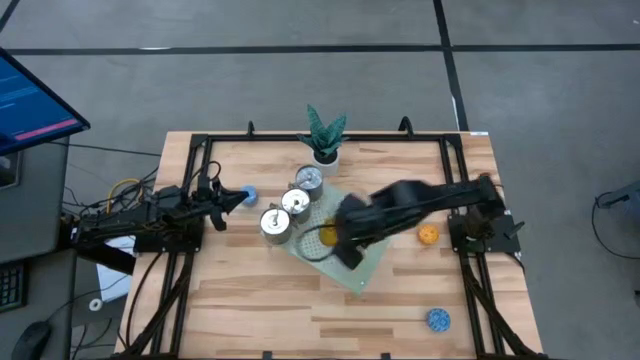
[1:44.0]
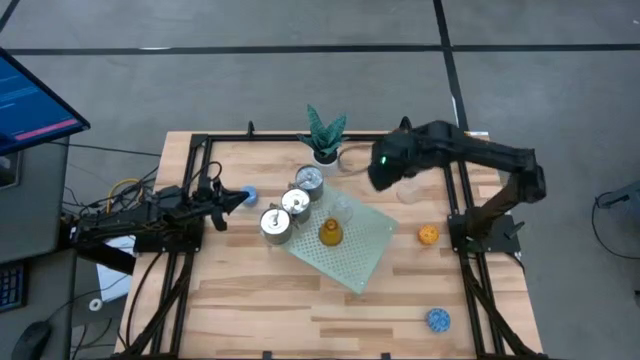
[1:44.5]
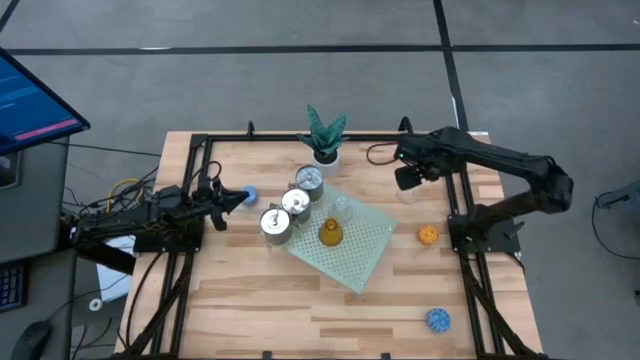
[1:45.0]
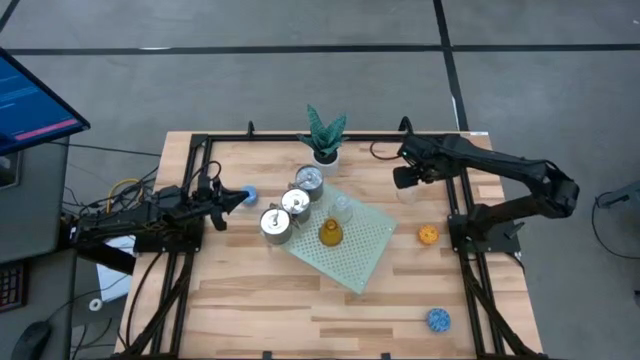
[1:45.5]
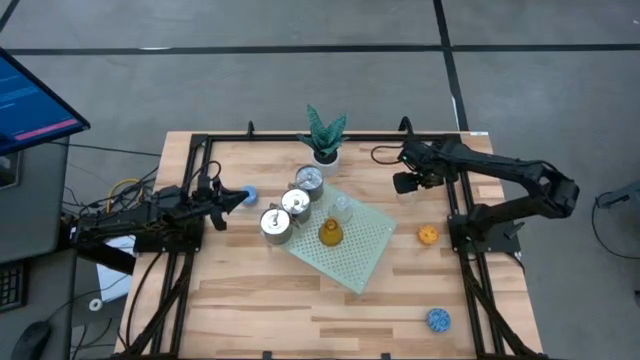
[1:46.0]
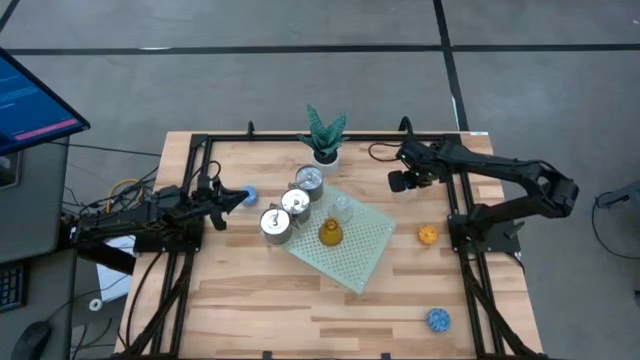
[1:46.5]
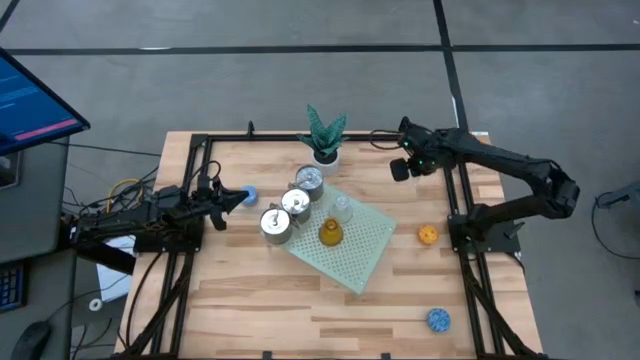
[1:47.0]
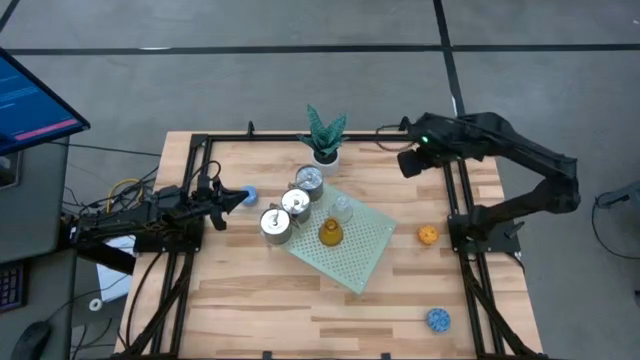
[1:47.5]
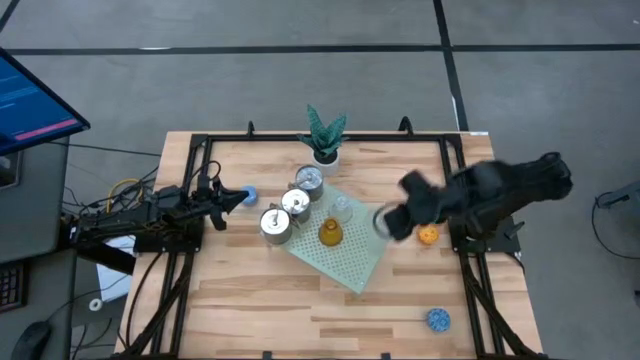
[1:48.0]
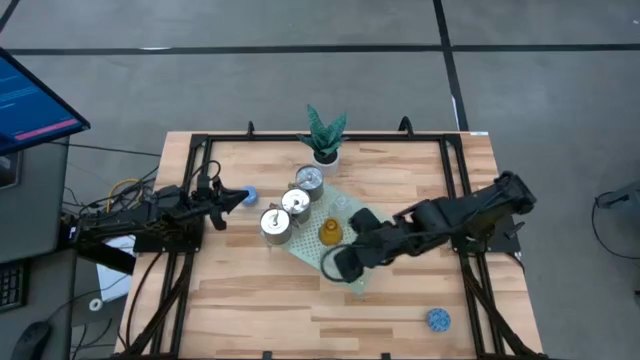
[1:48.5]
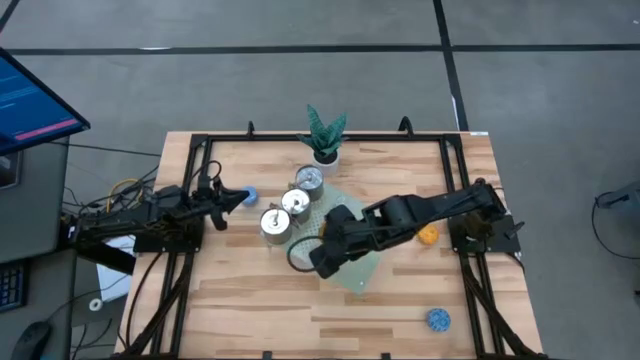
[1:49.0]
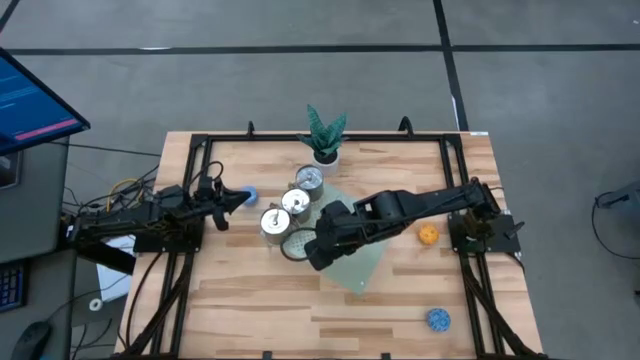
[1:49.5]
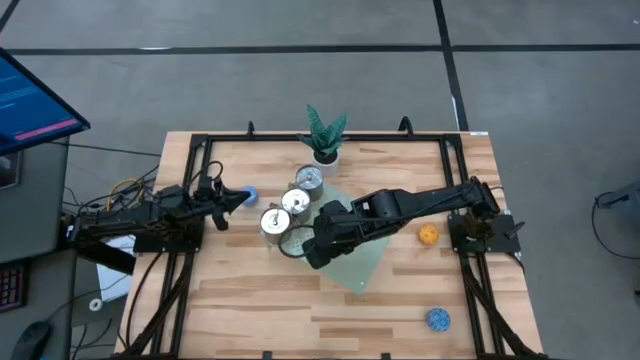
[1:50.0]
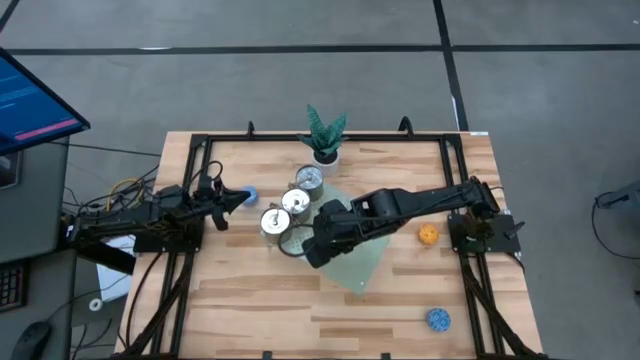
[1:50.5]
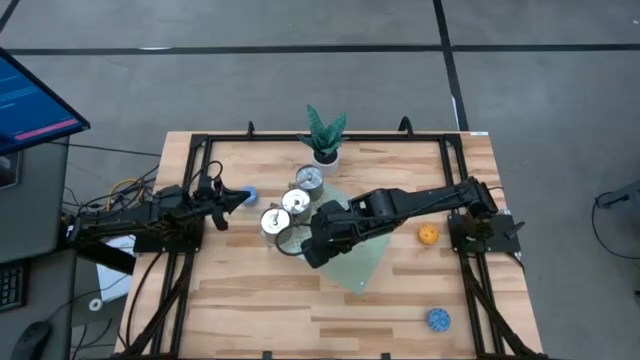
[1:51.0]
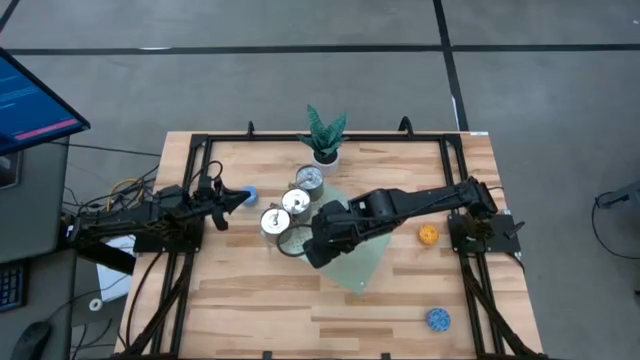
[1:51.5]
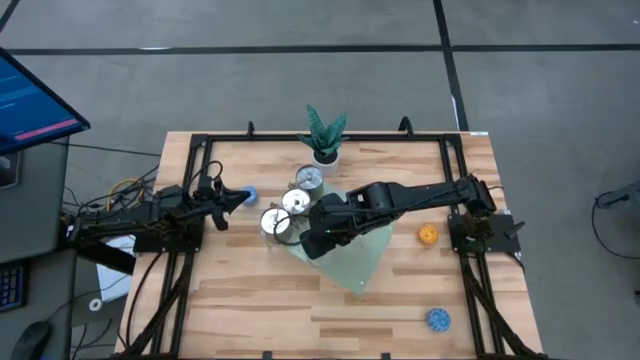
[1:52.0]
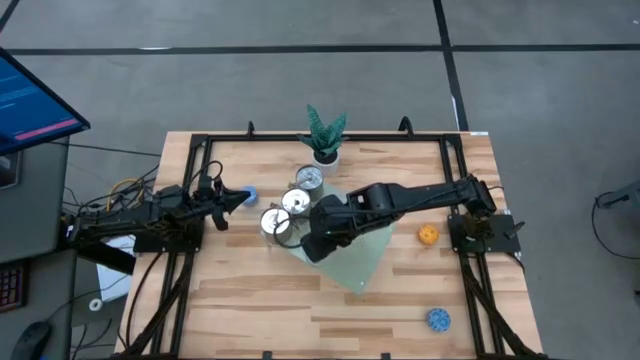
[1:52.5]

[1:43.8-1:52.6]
Task: Pick & Place candle stick holders
Put the transparent candle holder on the shelf

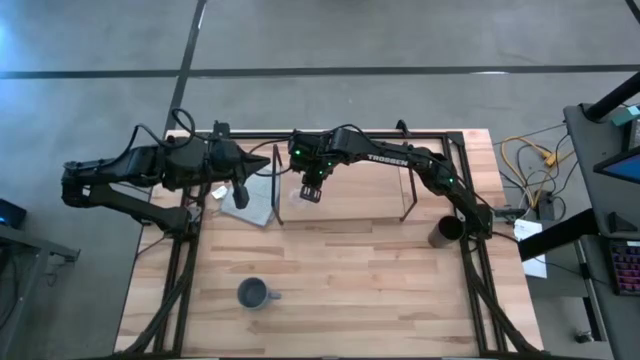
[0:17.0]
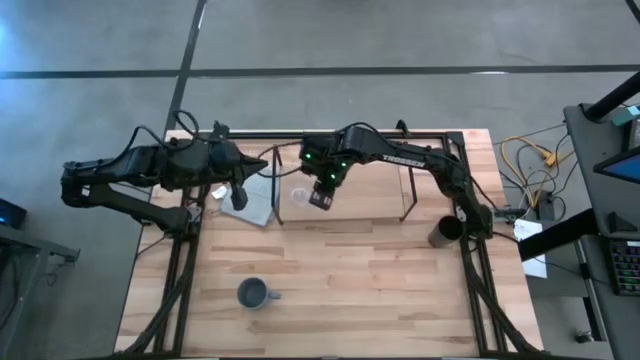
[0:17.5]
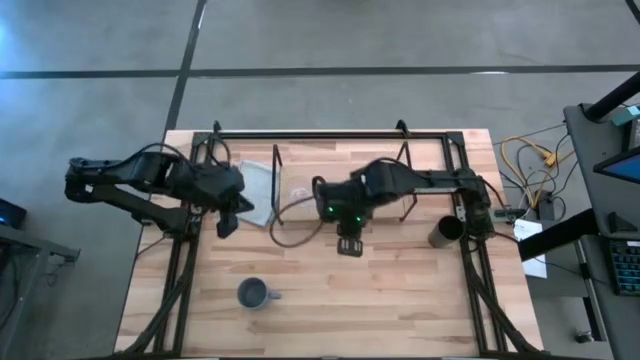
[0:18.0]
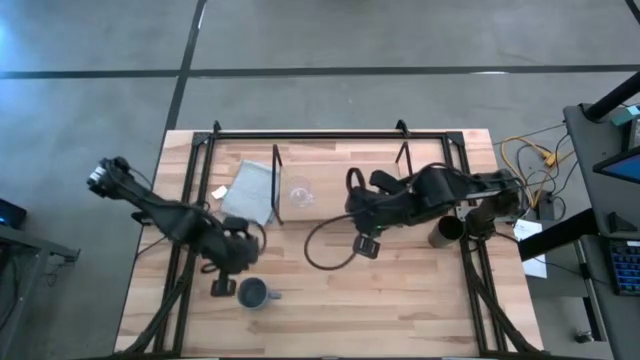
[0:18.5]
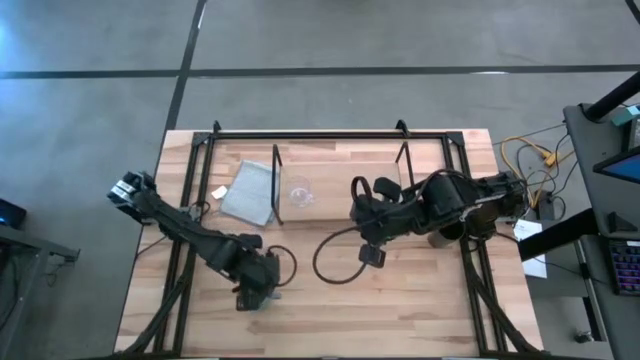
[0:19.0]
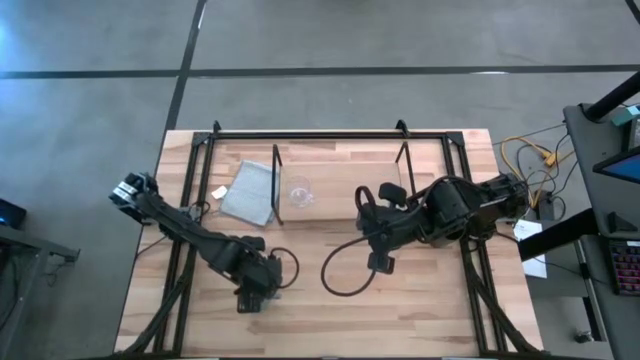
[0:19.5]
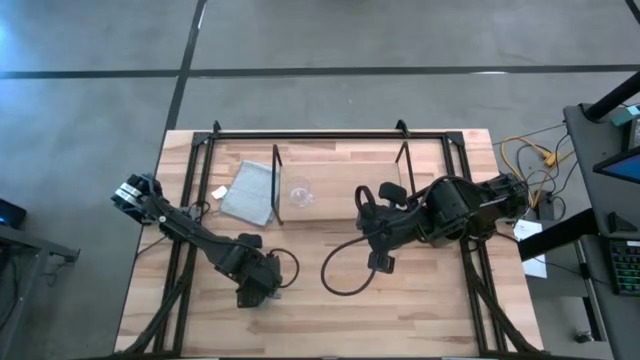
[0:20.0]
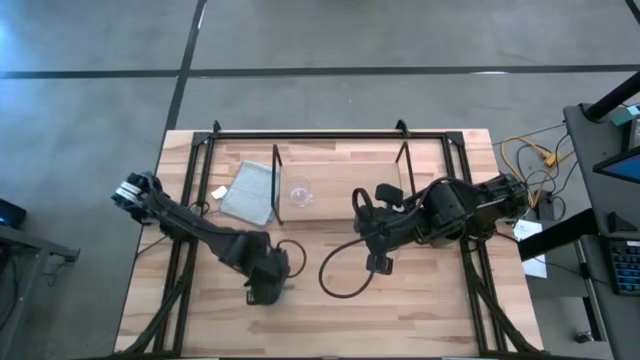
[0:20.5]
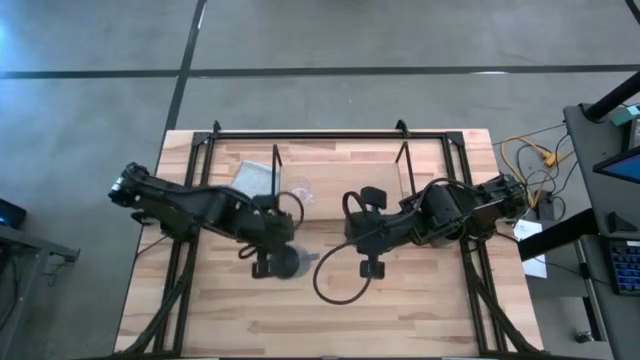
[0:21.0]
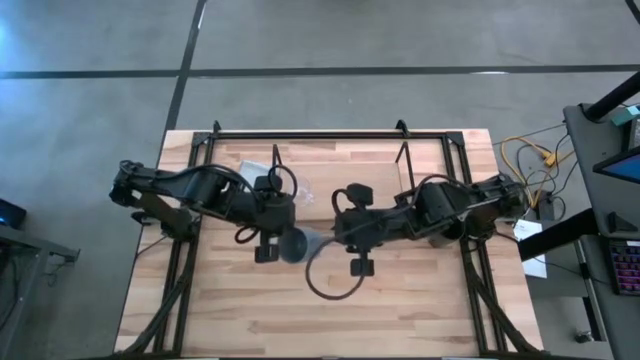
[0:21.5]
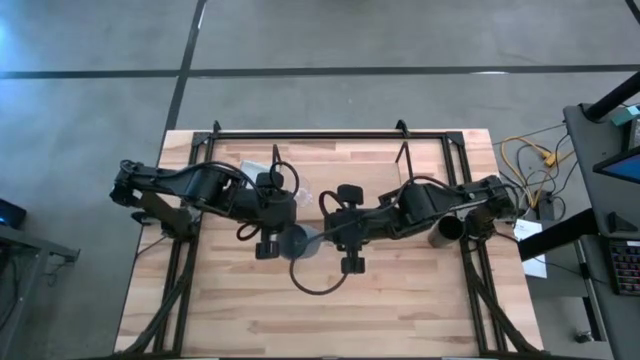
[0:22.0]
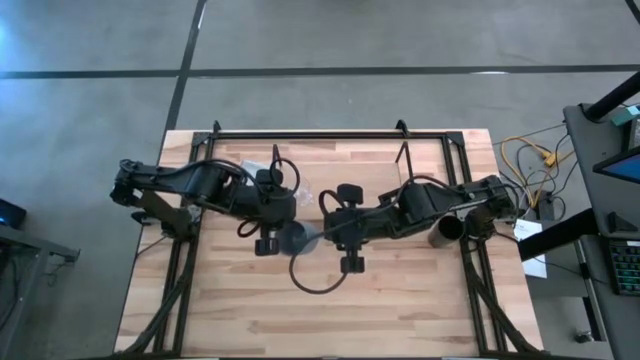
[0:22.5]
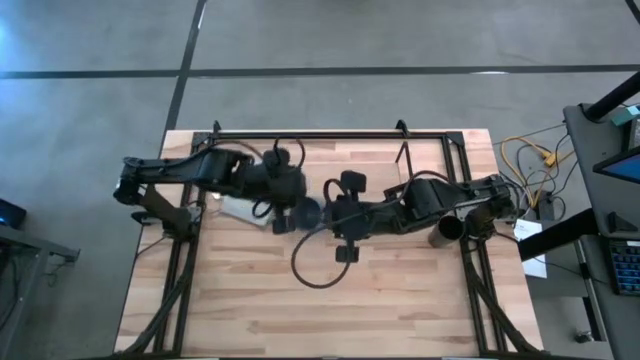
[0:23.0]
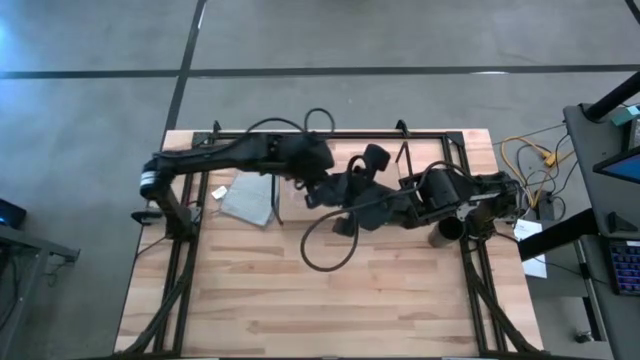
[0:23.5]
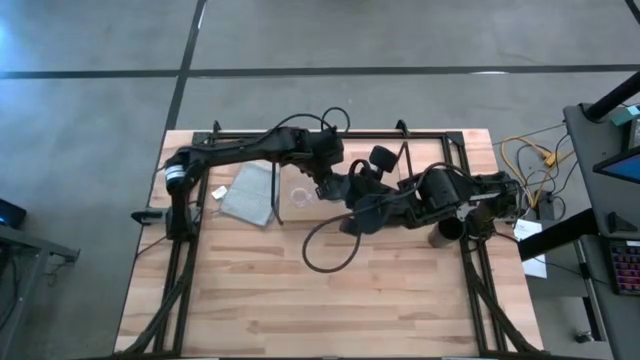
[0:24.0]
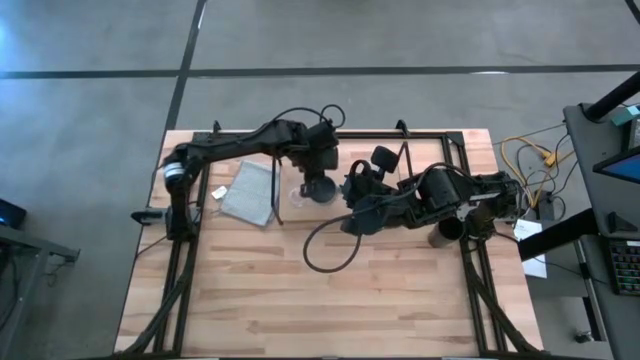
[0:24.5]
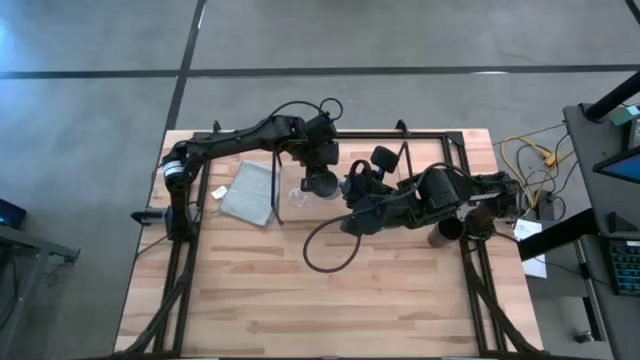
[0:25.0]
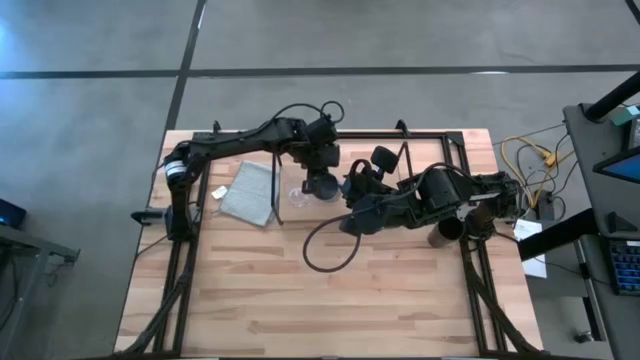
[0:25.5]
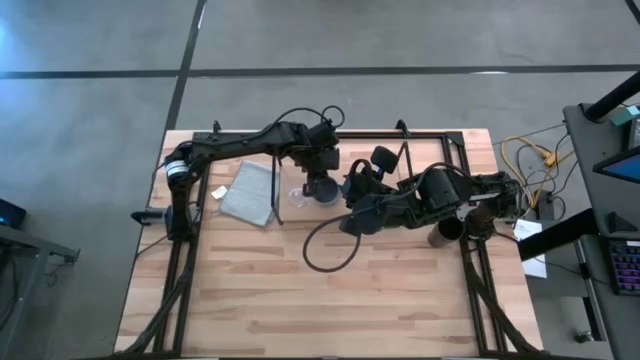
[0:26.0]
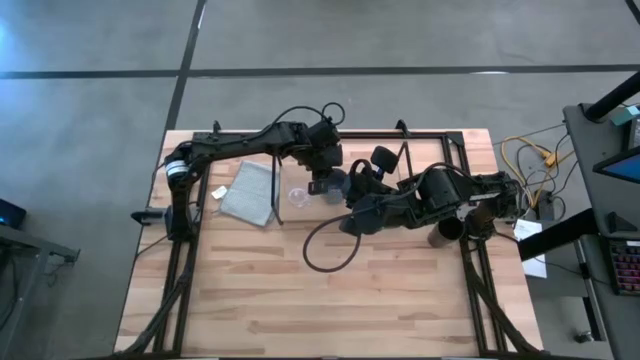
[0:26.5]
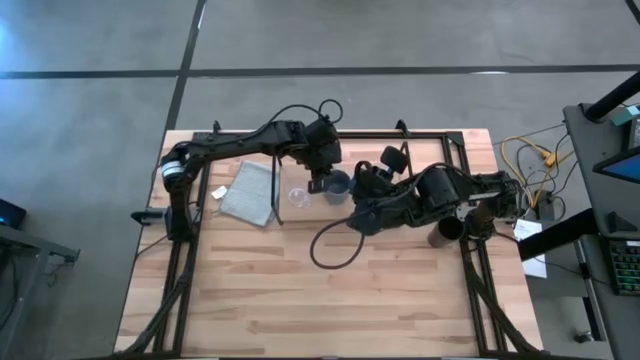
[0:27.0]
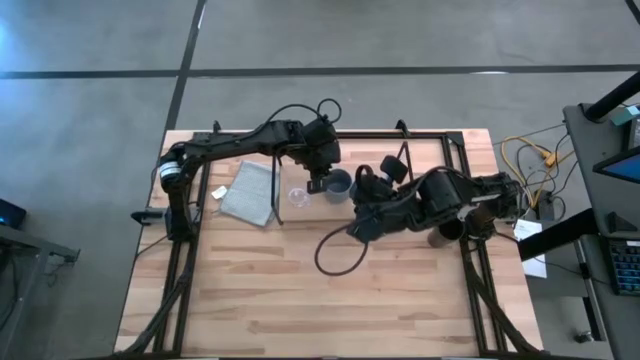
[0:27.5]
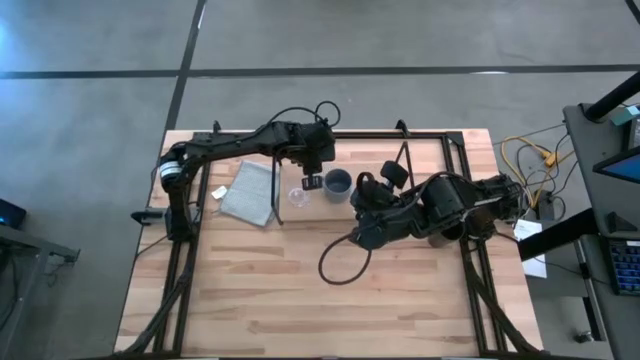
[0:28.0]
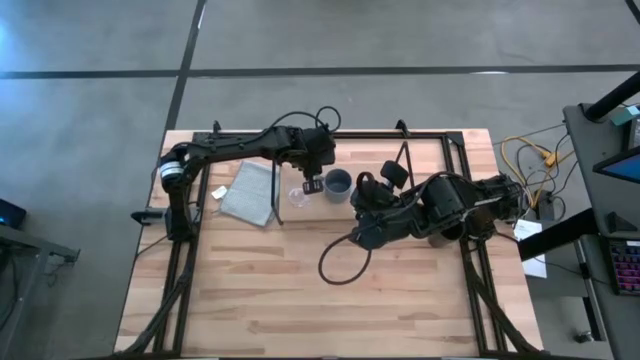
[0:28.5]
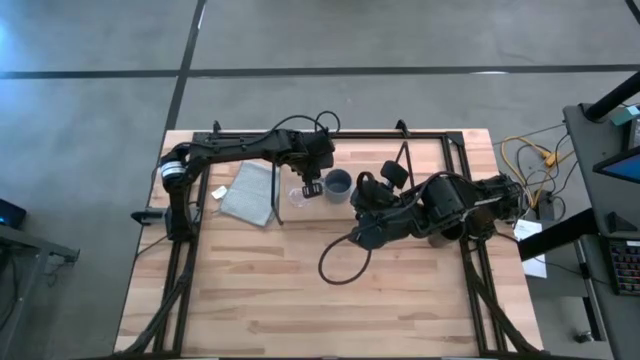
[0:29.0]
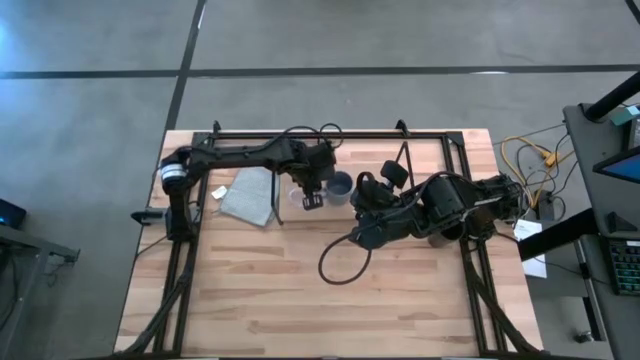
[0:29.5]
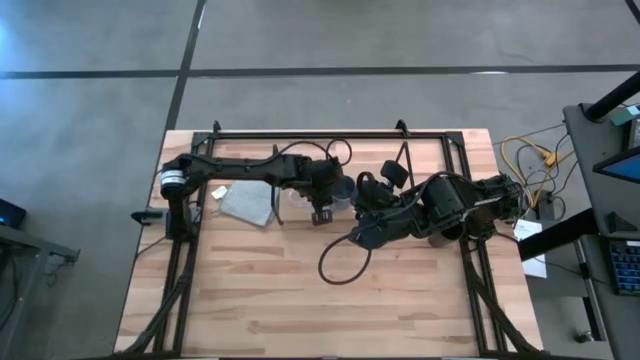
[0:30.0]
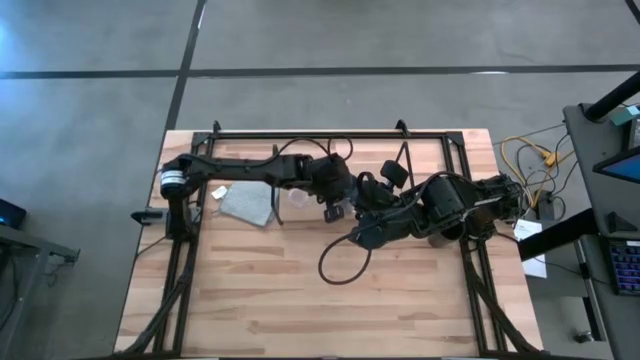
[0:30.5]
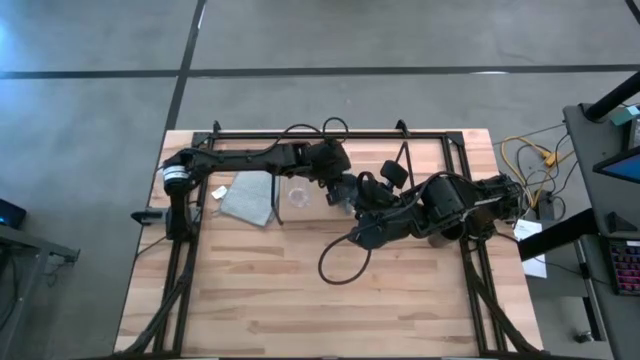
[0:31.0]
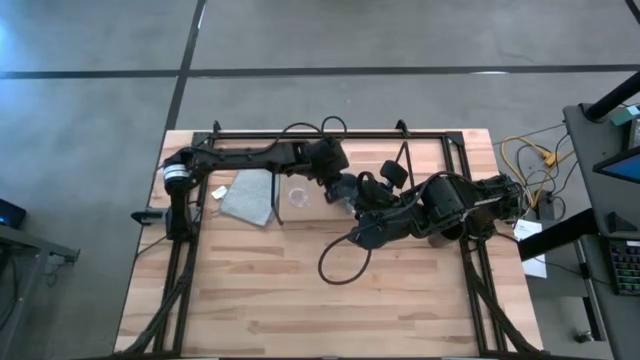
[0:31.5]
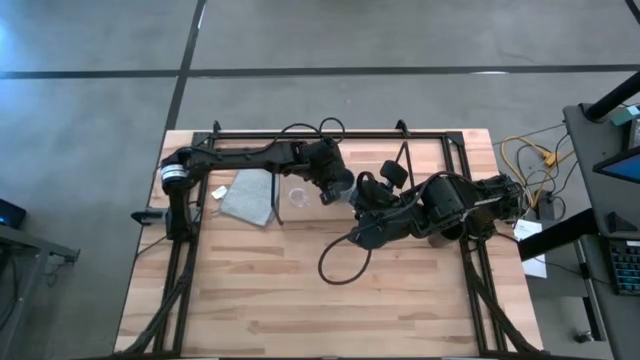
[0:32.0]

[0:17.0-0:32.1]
Task: Stack small to large cups/mugs on shelf
Put the blue mug on the shelf
